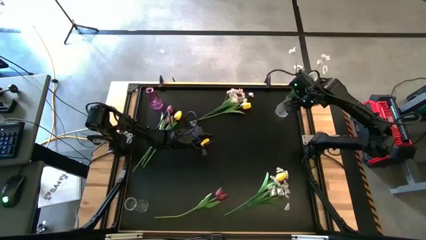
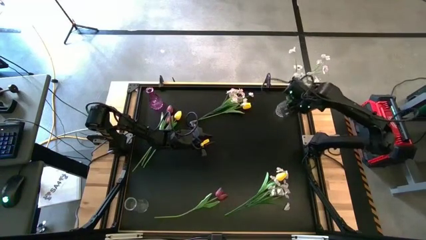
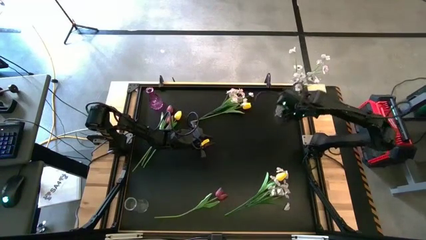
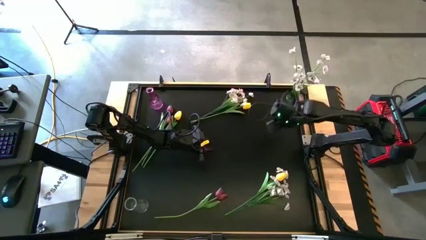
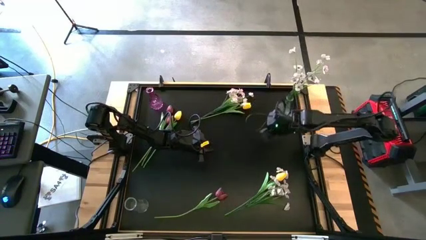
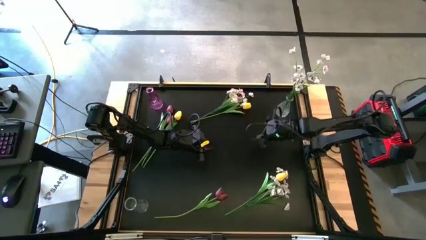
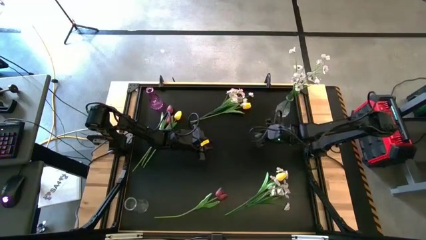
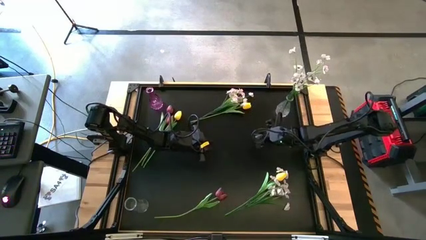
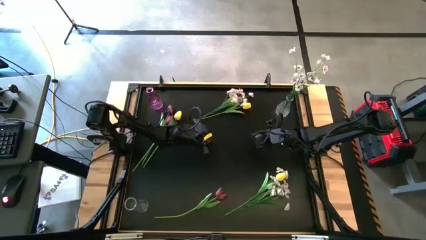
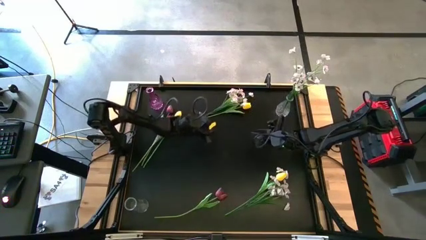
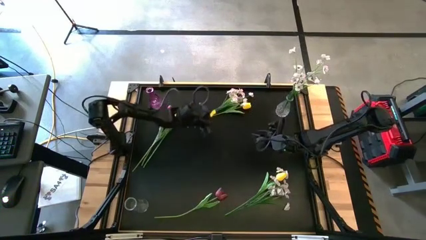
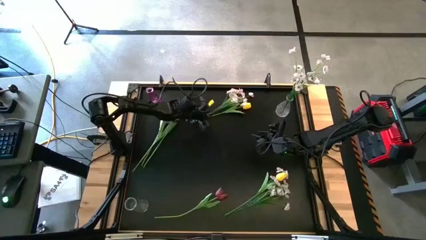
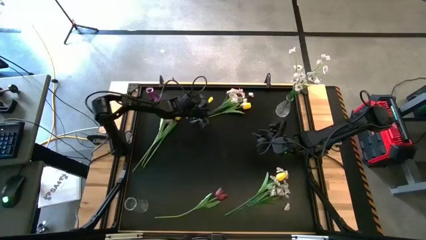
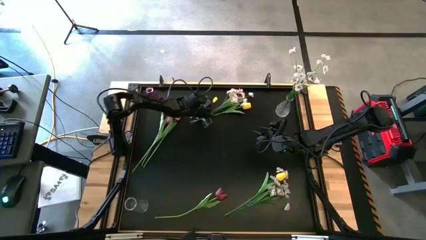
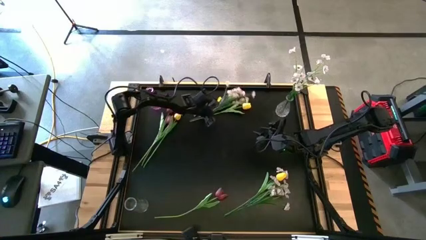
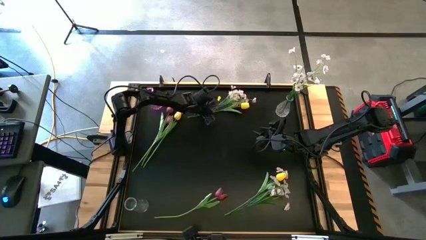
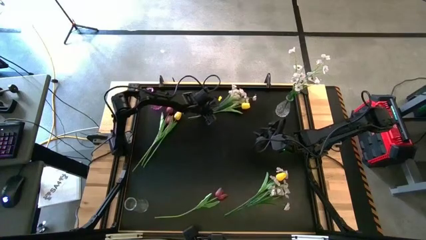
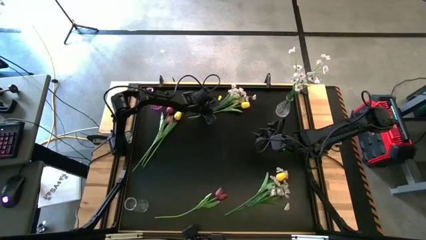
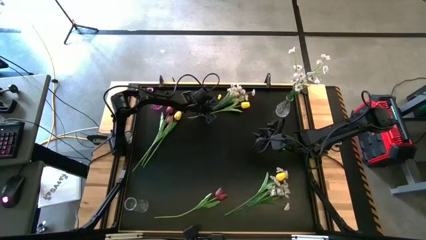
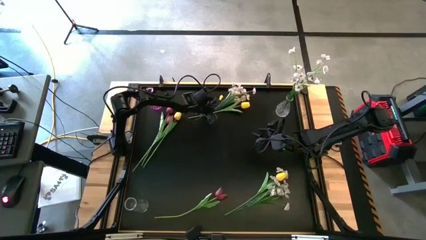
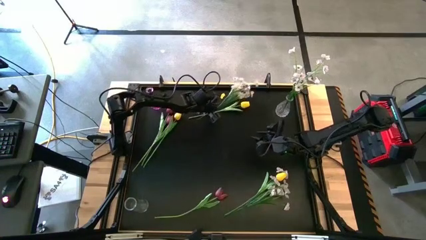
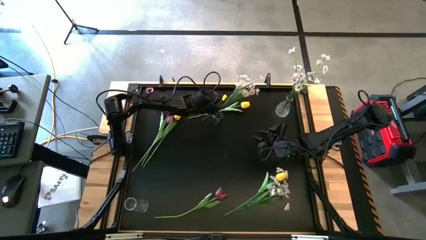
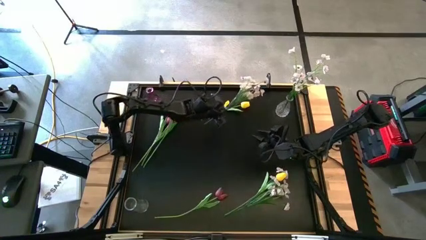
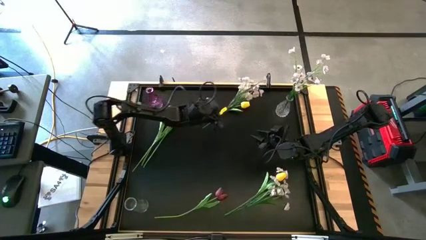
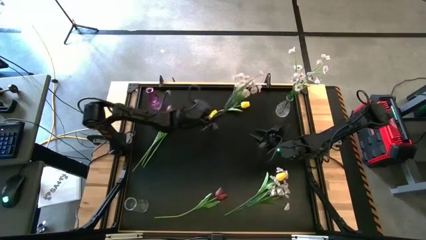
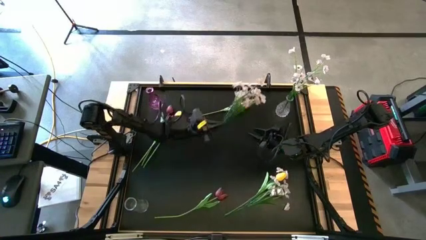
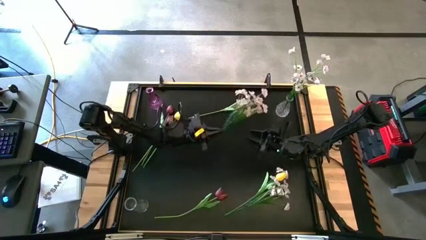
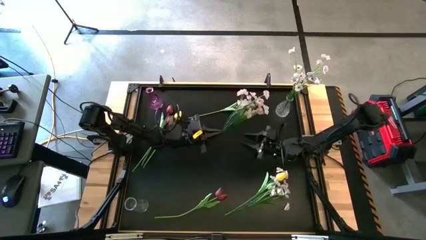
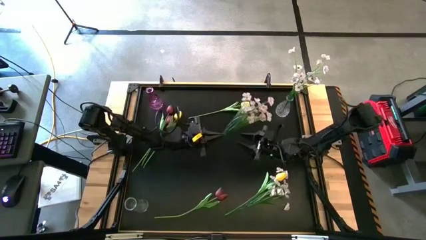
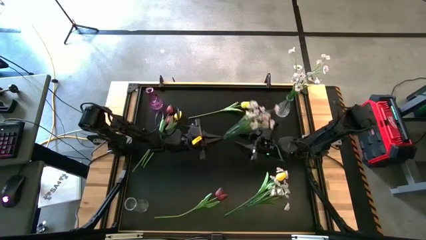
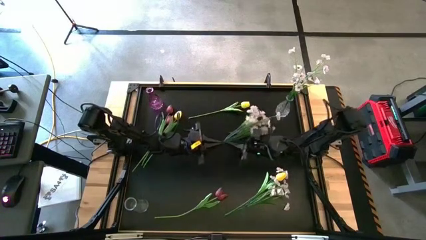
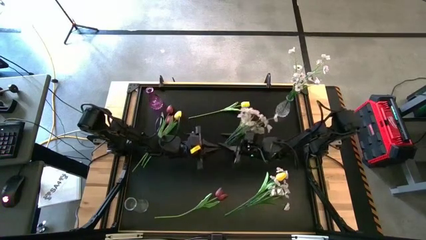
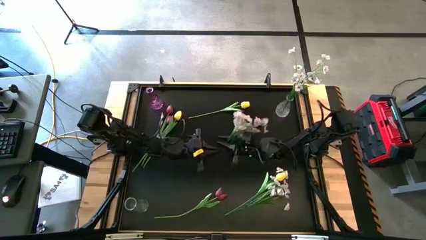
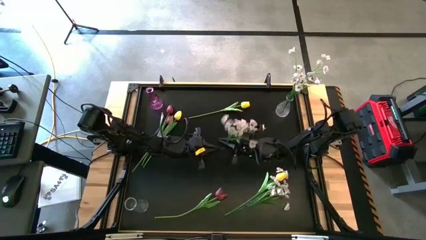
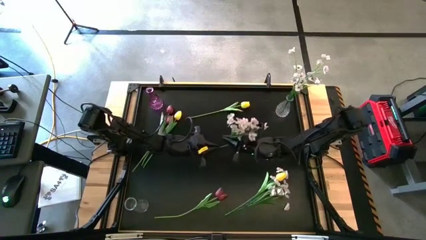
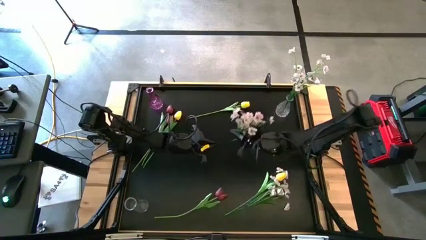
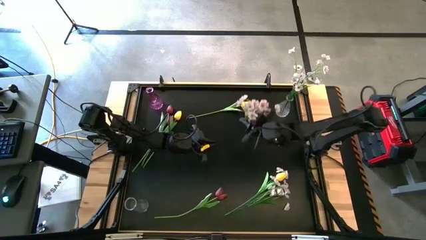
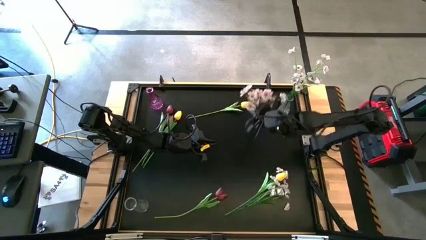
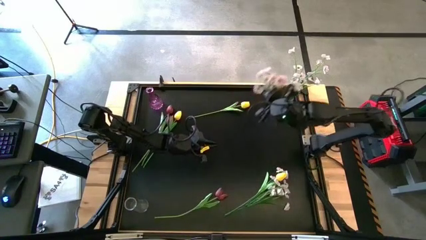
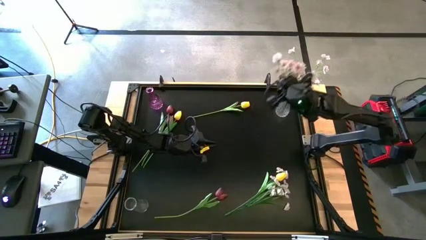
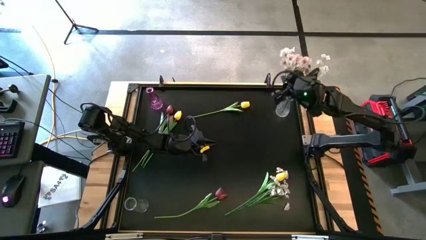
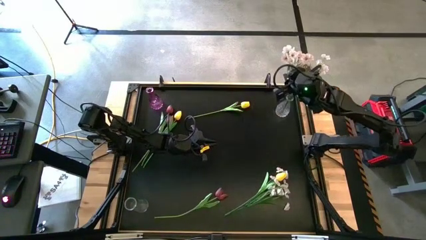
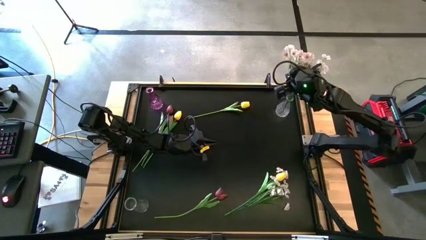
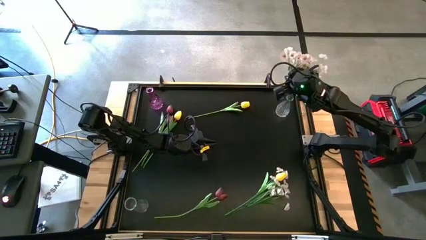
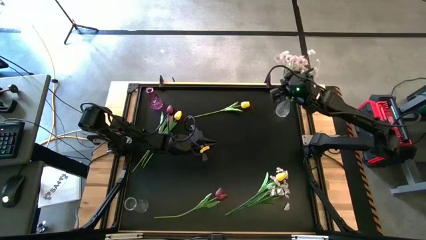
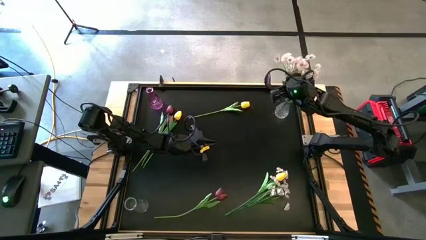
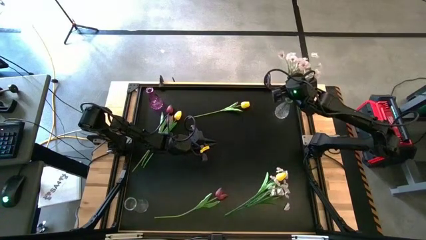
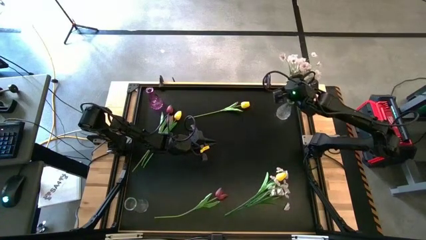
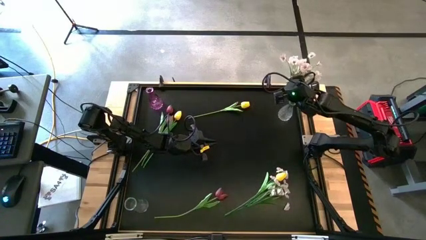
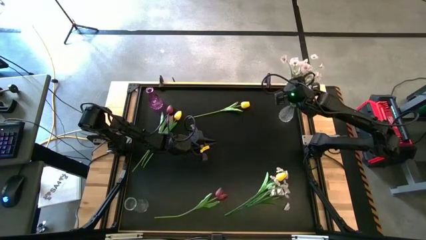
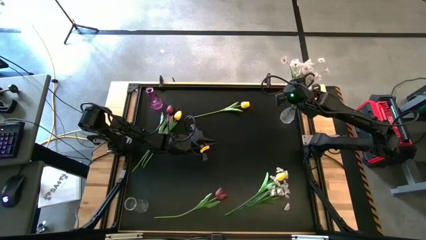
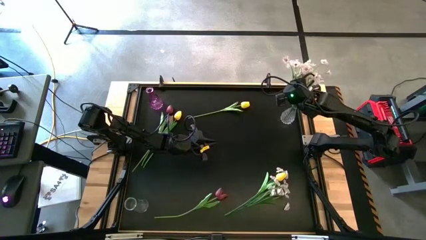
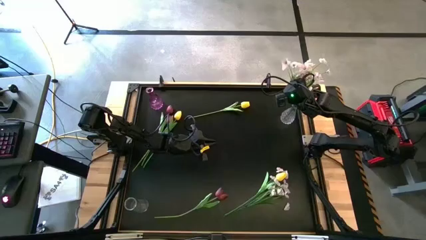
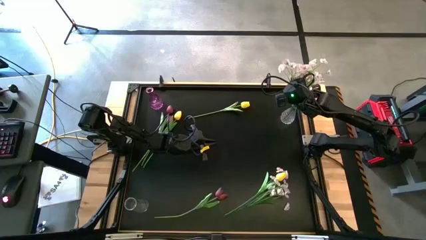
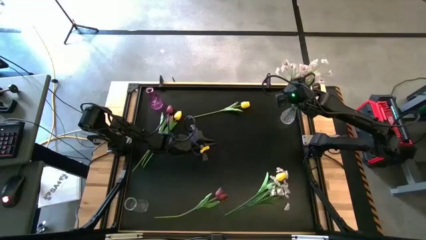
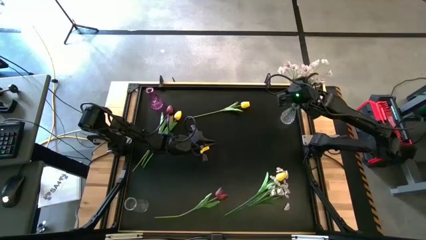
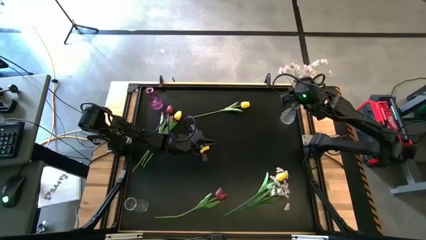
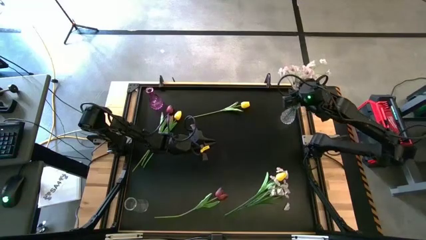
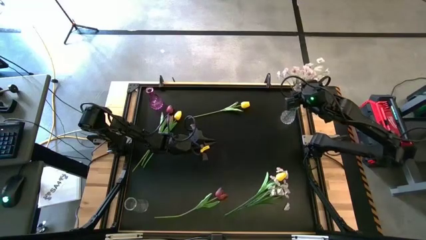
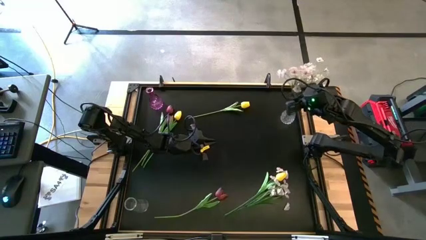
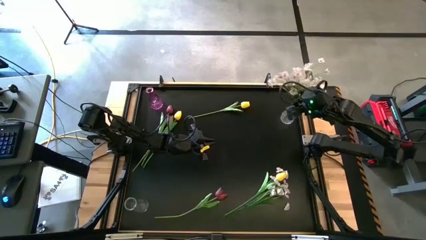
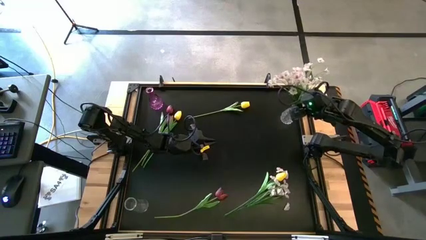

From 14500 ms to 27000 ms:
Task: Sort flowers into vase by color
Put the top white flowers into the top transparent vase
